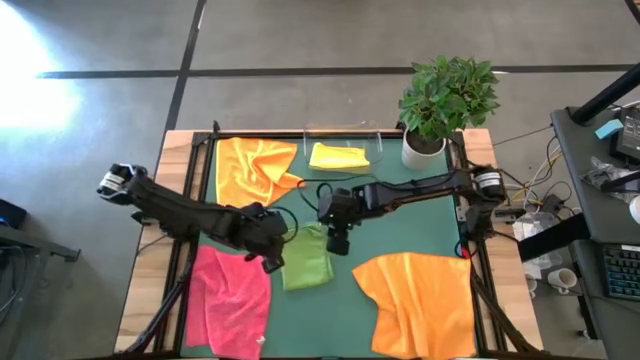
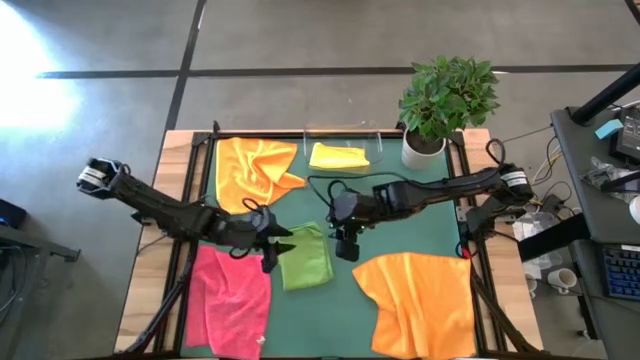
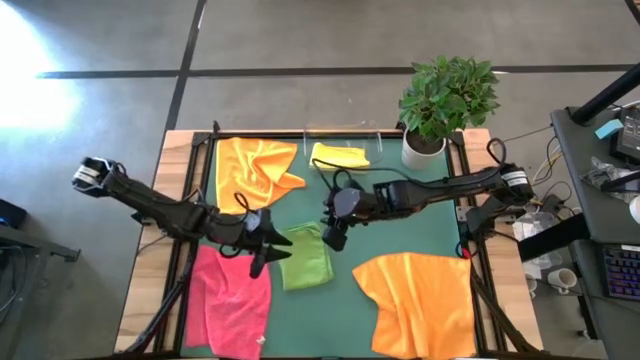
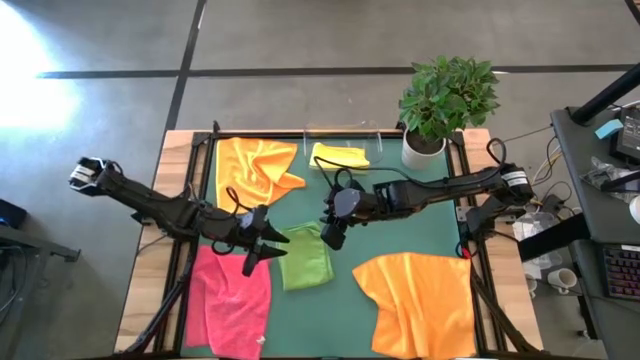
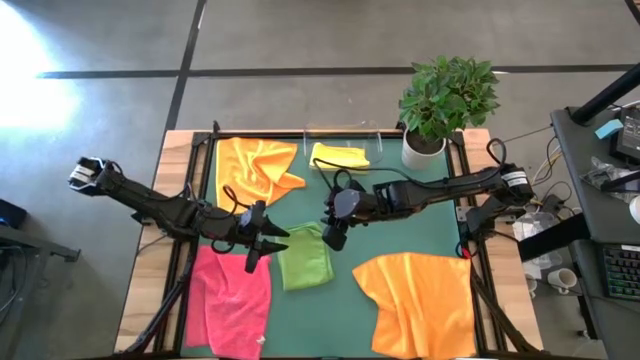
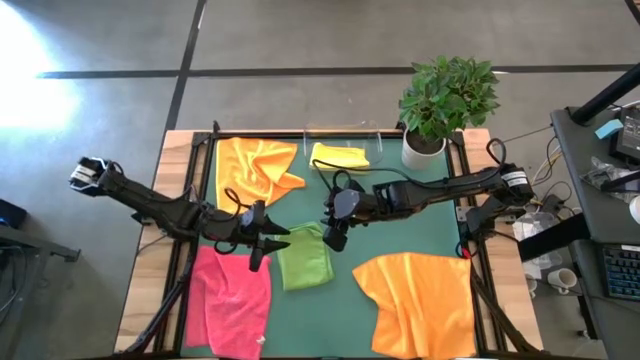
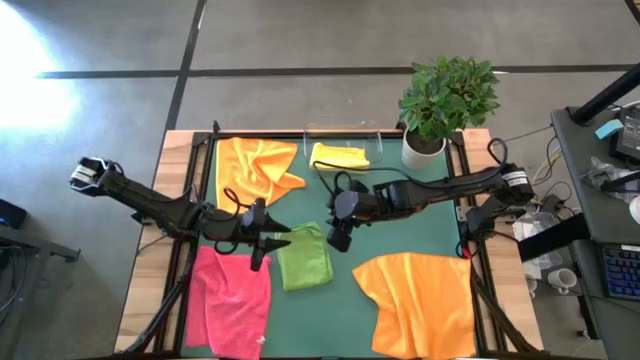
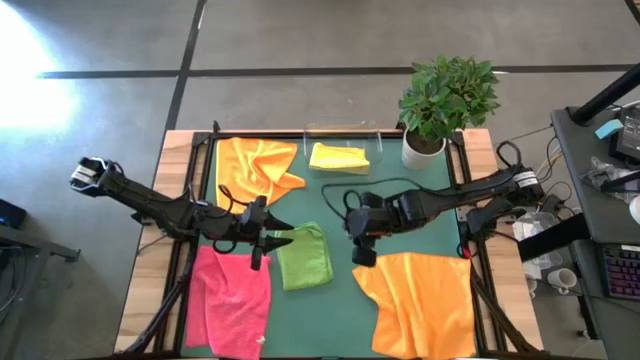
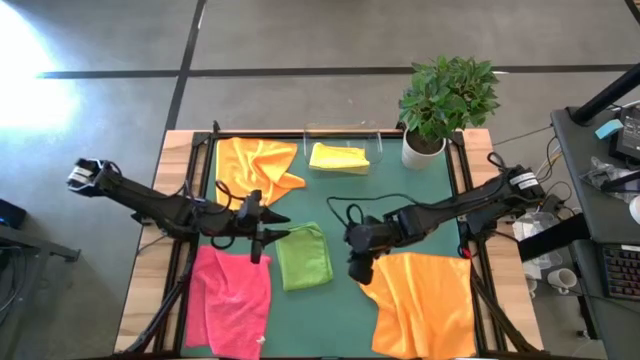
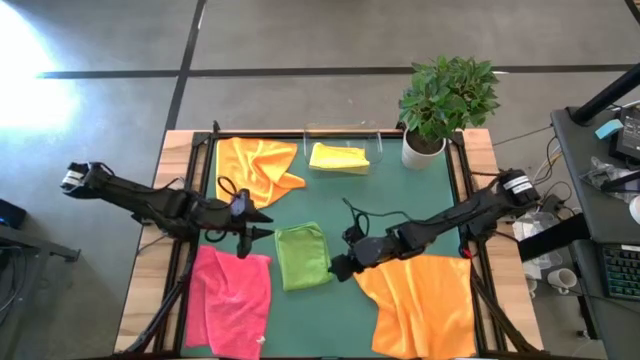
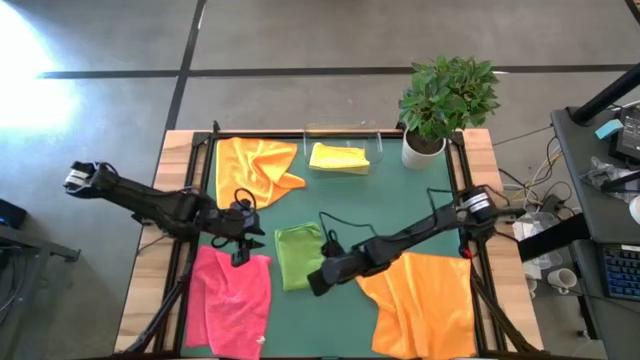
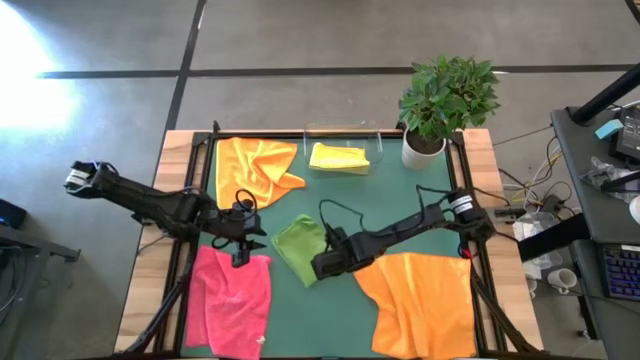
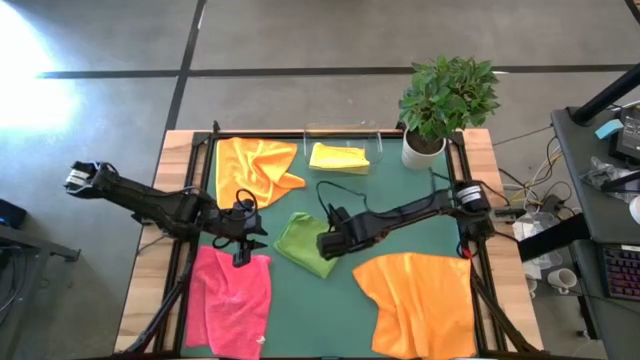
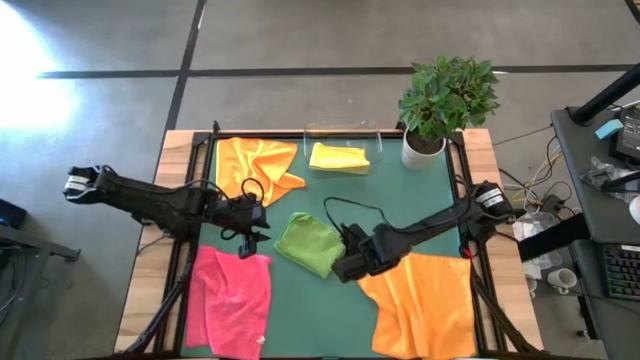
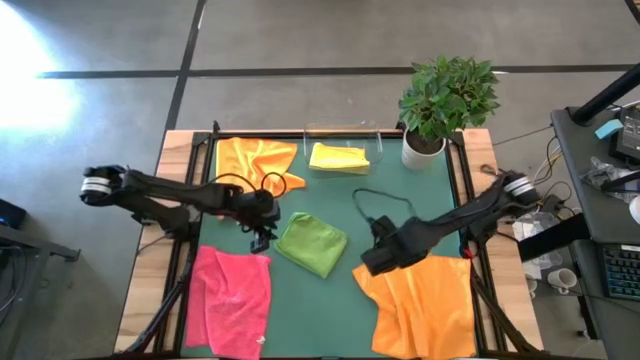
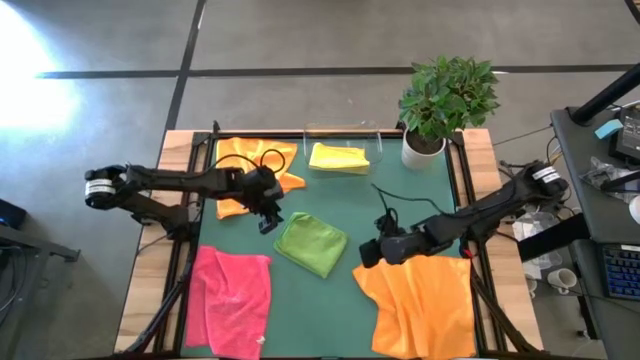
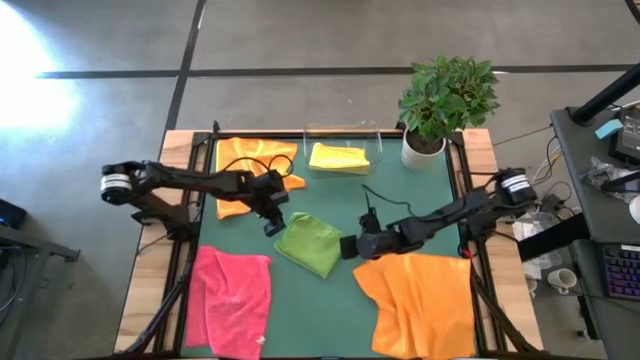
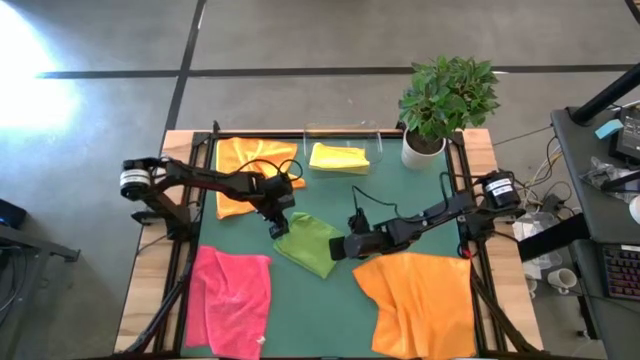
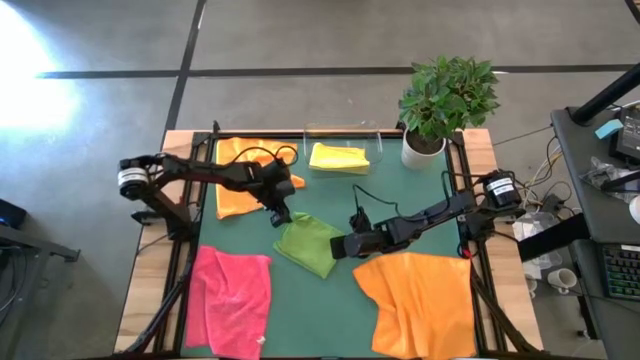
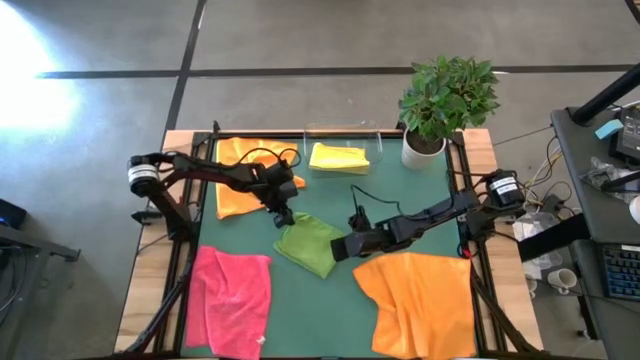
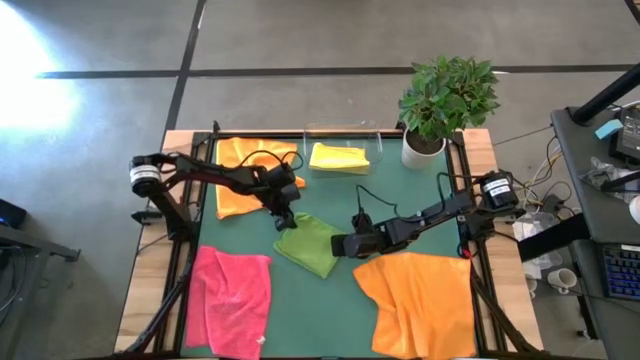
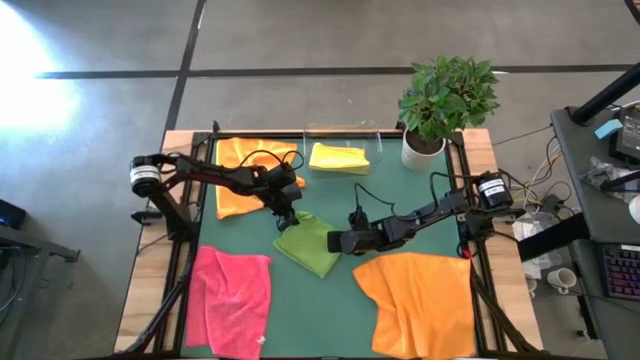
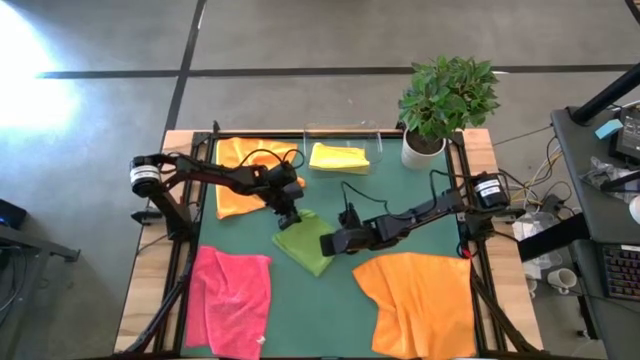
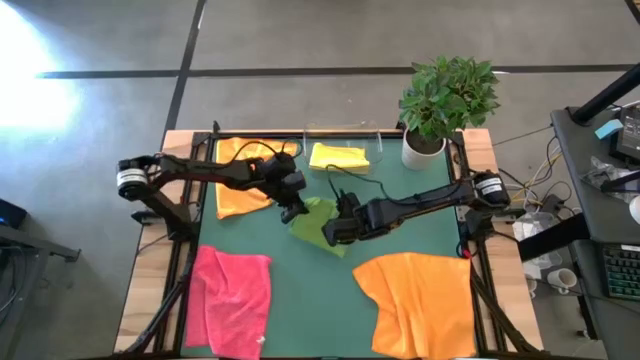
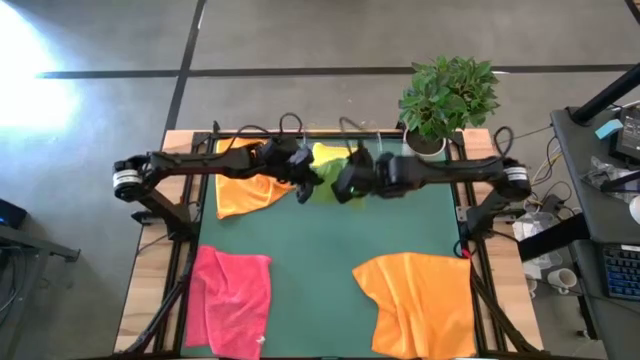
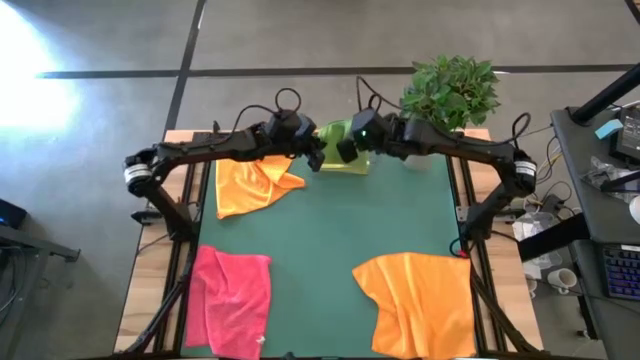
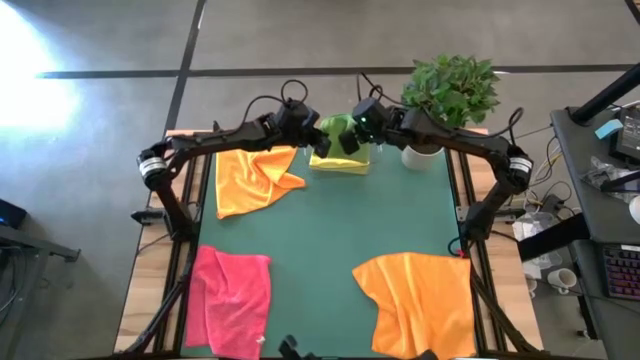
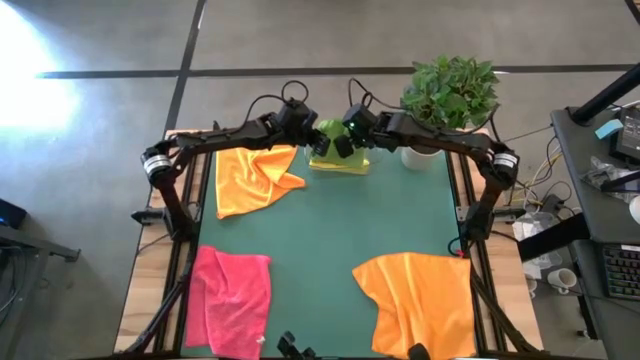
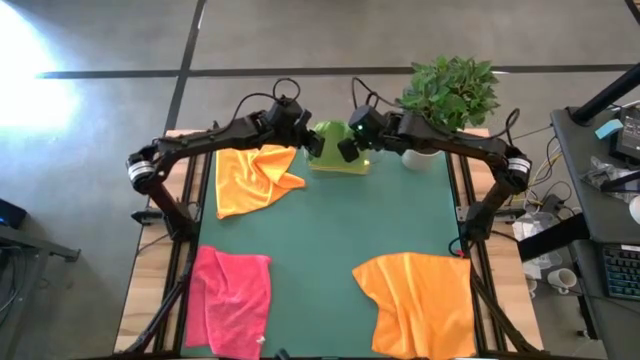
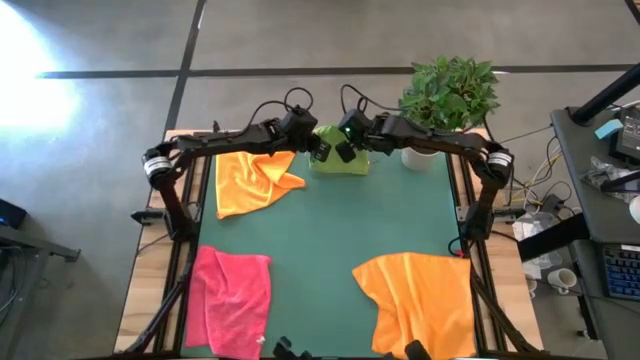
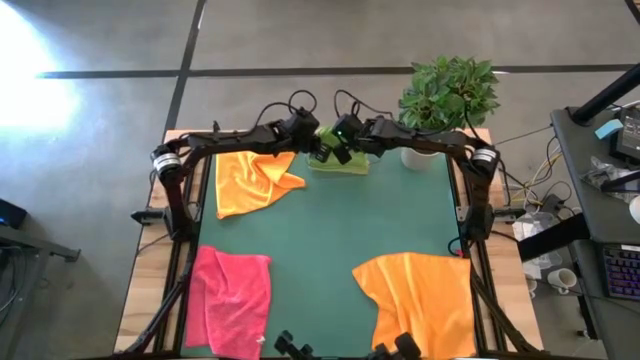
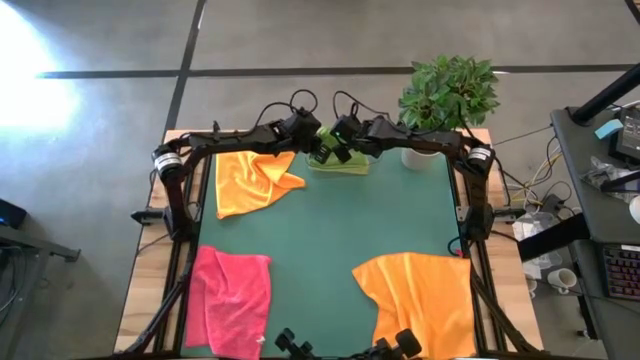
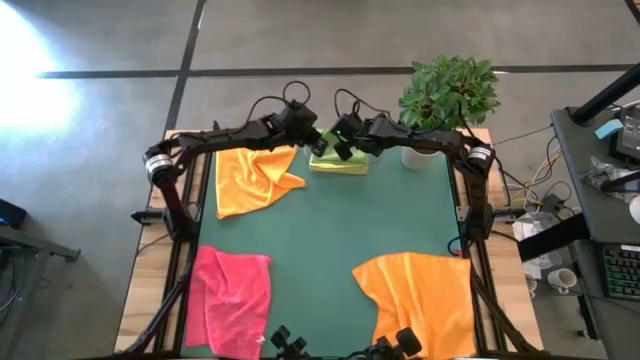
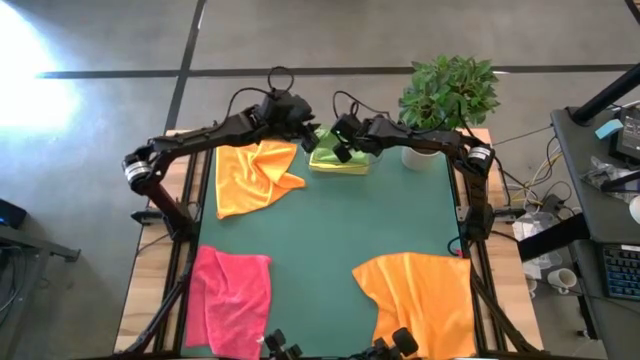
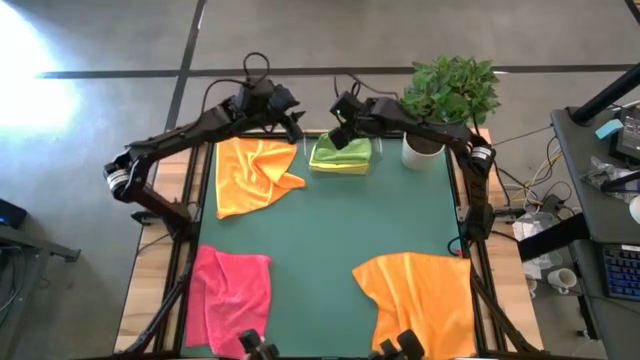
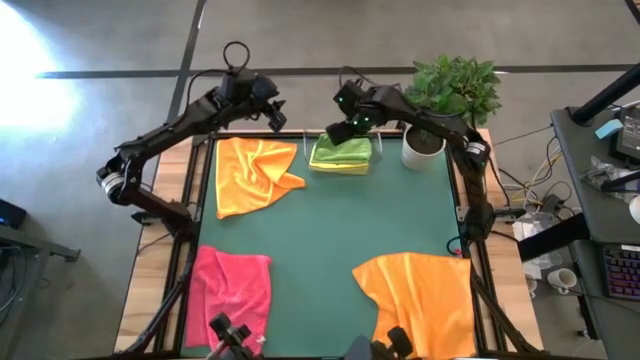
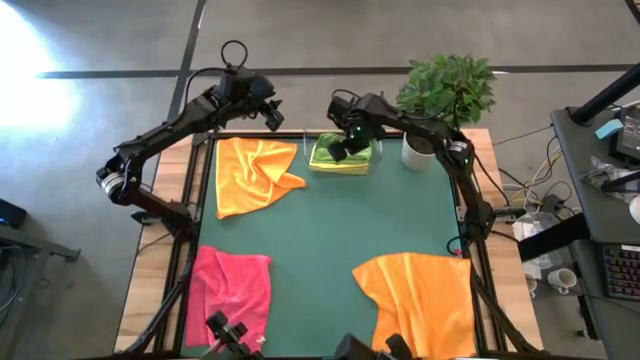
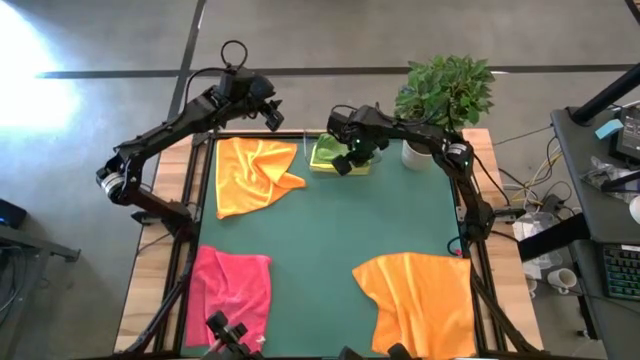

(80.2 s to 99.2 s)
Task: Fold microfiber towels
Put the folded green towel into the transparent bin

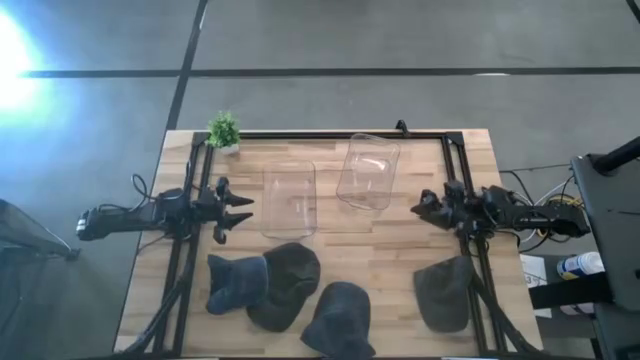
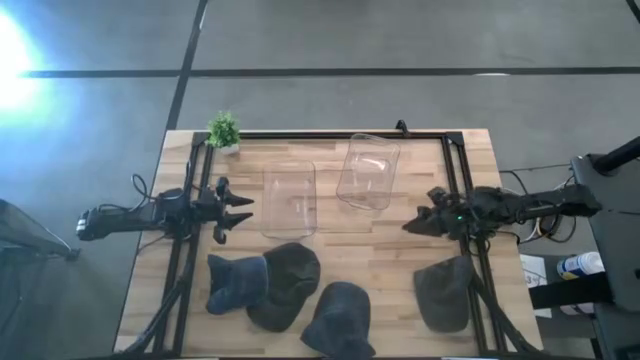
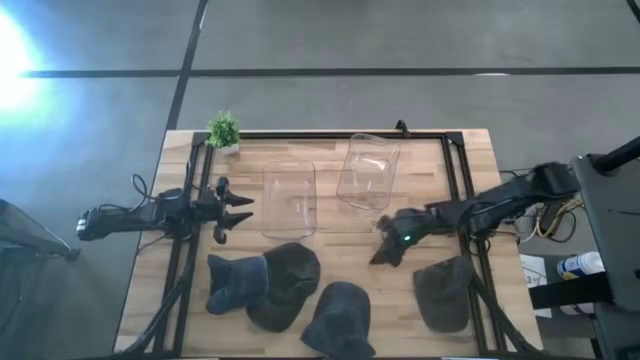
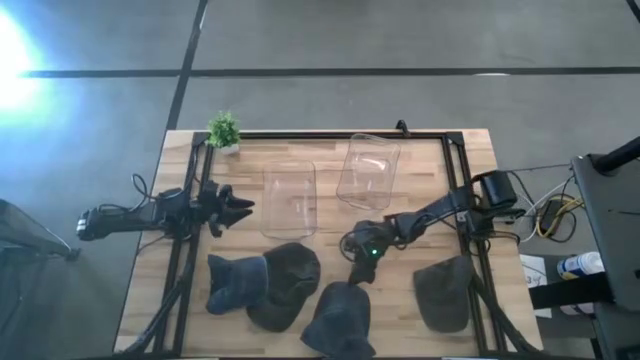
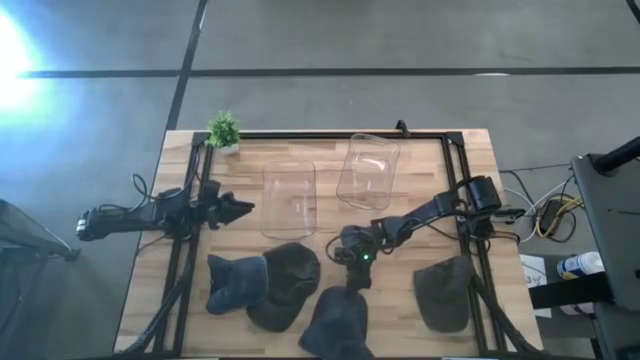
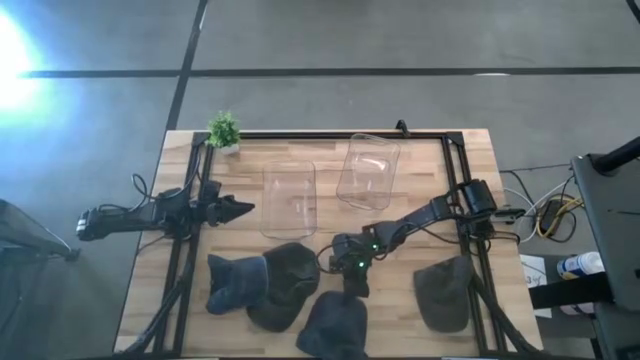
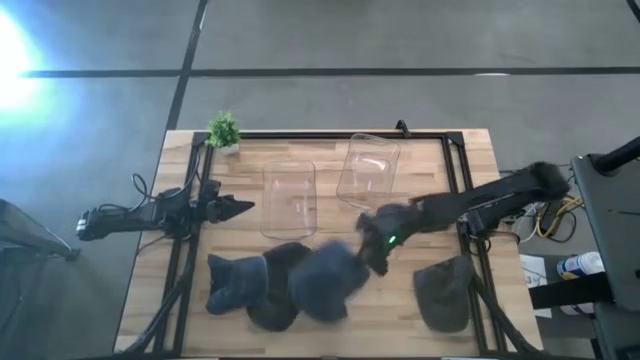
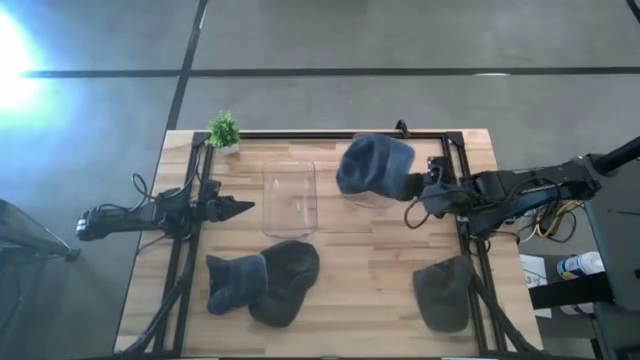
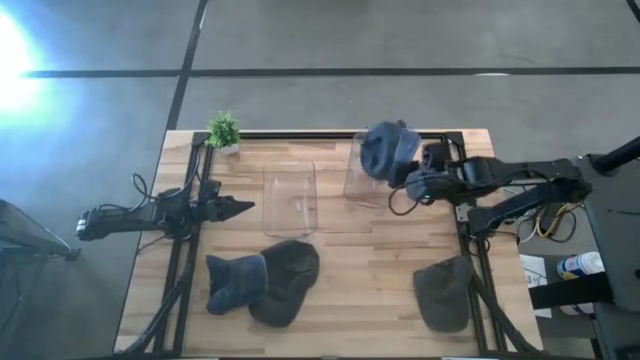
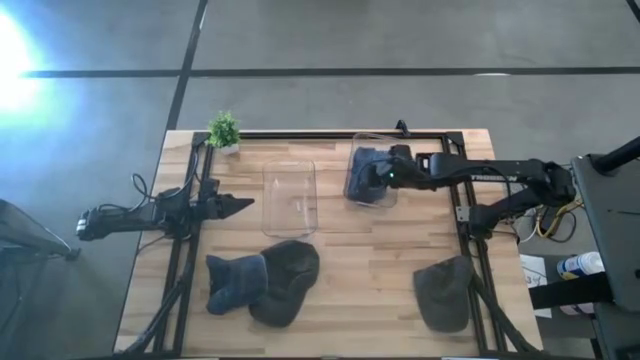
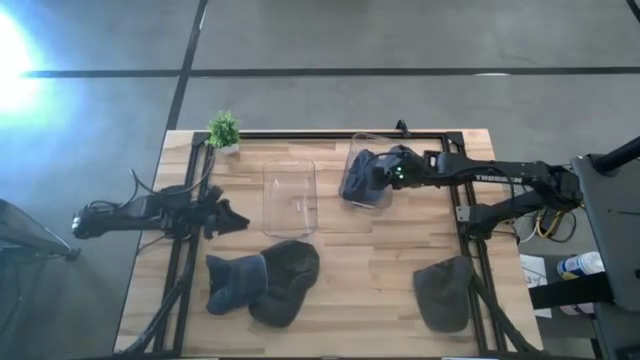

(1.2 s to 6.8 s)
Task: Pick & Place hat
Put the right blue cap into the right transparent bin
